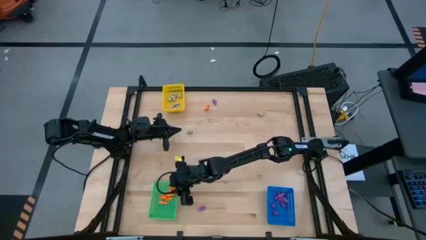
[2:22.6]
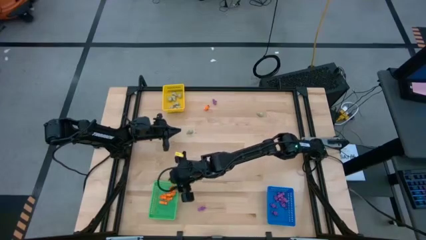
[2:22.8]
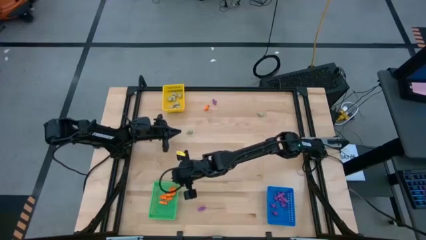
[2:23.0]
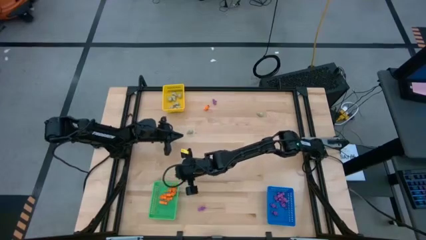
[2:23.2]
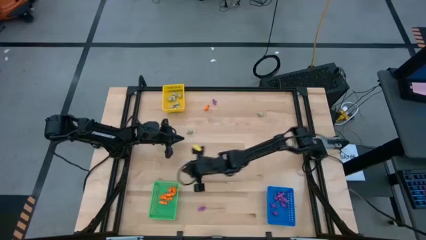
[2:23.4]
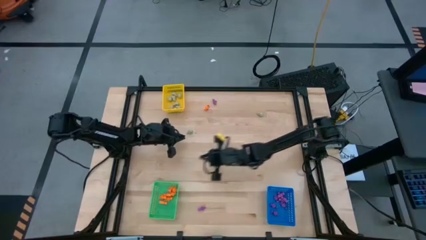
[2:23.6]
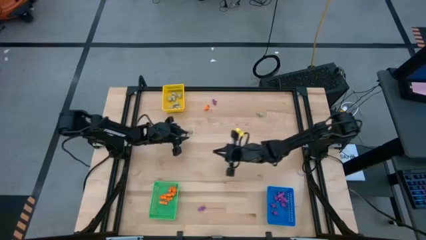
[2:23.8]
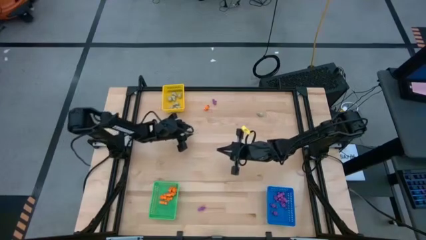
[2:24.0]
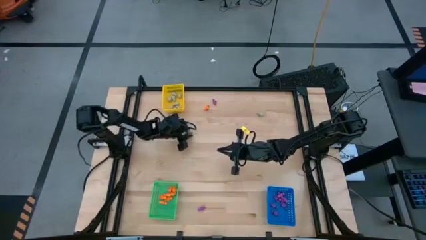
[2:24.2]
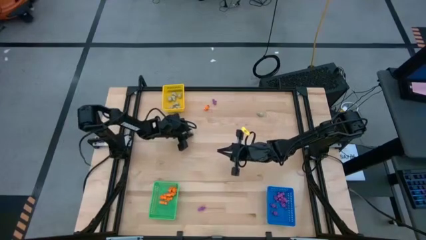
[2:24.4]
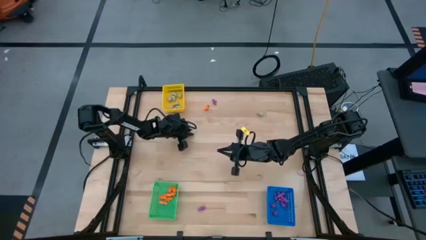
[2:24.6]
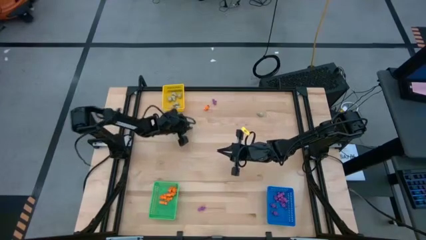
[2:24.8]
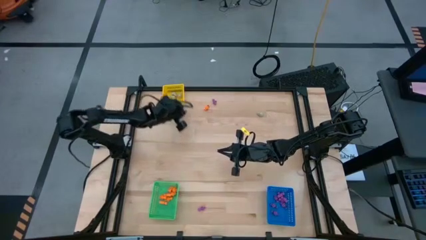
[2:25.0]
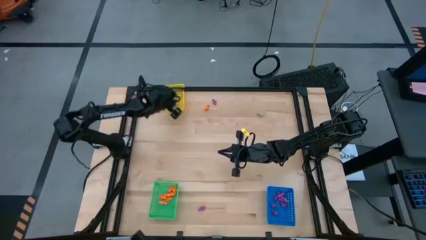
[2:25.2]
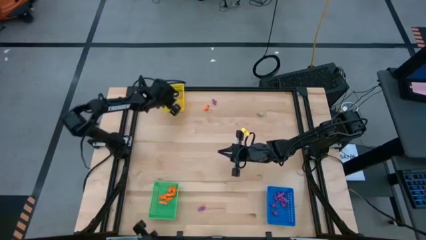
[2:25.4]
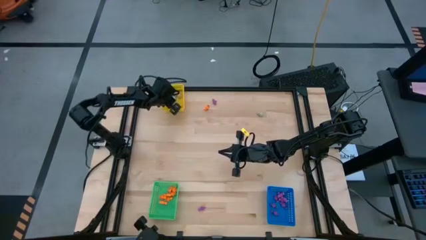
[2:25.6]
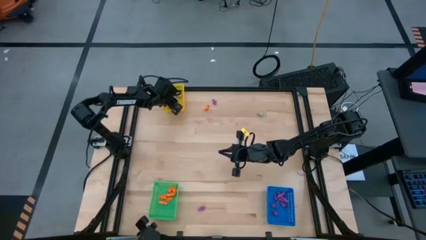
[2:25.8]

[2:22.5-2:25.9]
Task: Sort Halloween decoration
Put the gray skull toy into the yellow bin

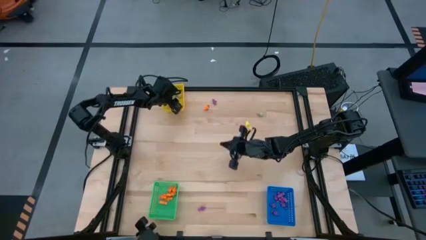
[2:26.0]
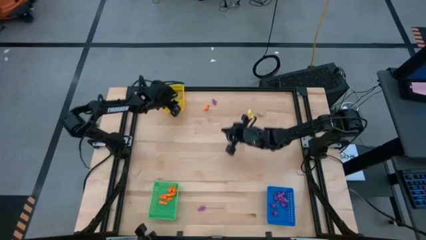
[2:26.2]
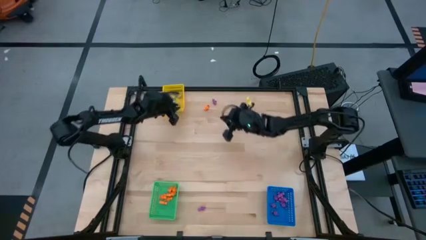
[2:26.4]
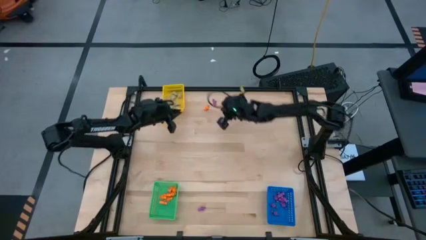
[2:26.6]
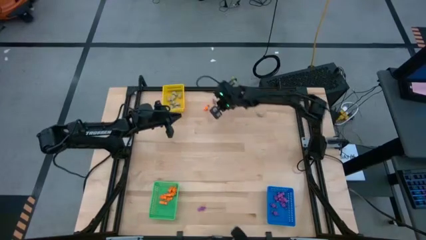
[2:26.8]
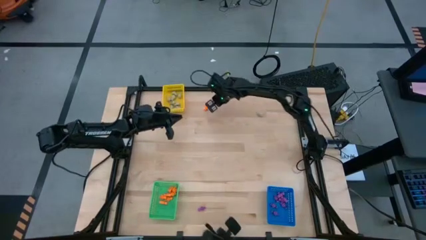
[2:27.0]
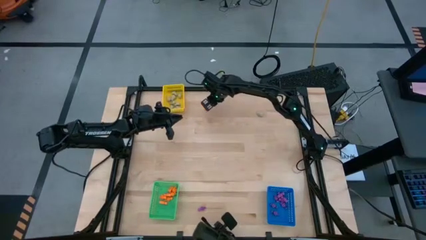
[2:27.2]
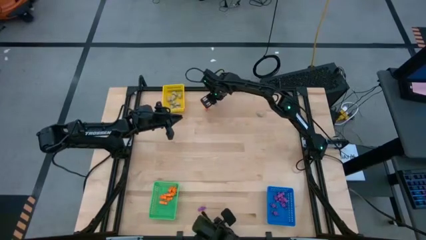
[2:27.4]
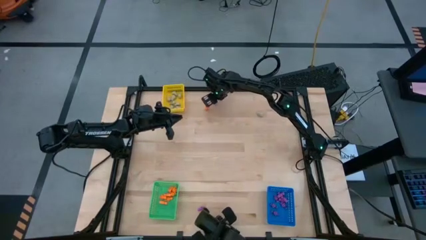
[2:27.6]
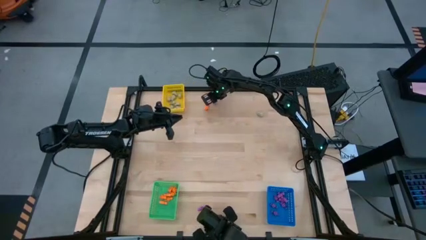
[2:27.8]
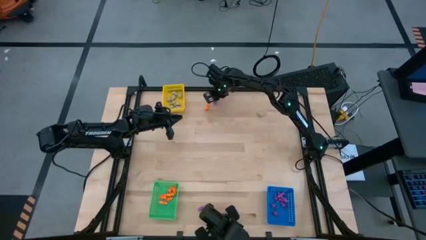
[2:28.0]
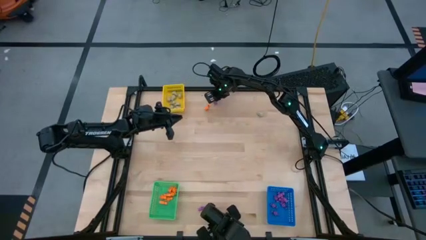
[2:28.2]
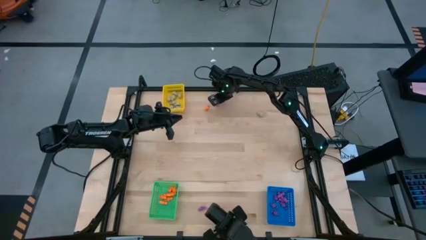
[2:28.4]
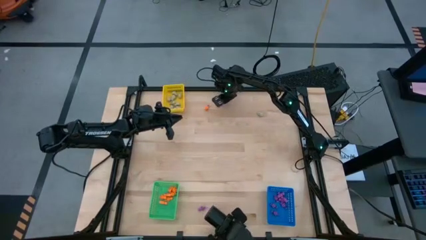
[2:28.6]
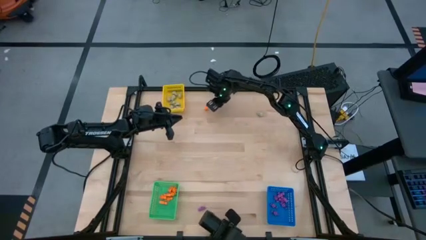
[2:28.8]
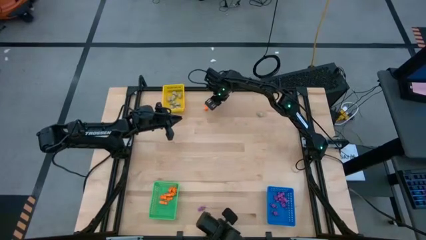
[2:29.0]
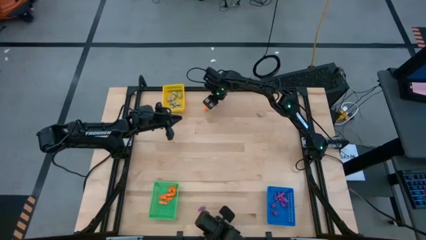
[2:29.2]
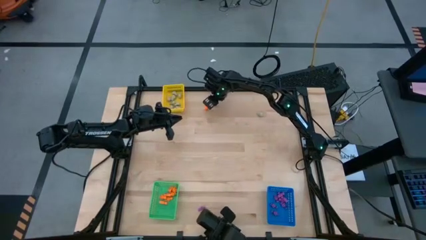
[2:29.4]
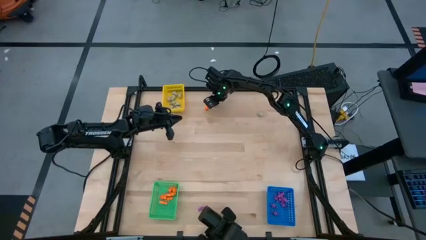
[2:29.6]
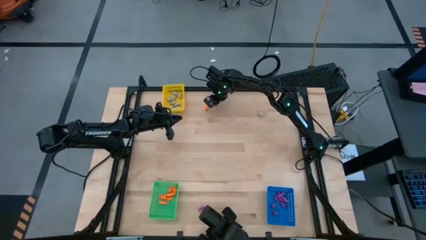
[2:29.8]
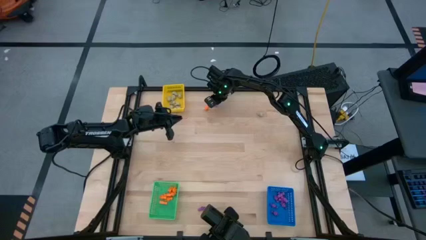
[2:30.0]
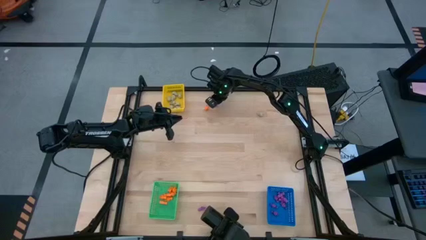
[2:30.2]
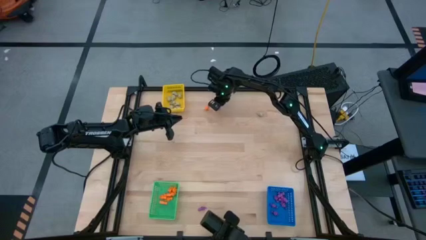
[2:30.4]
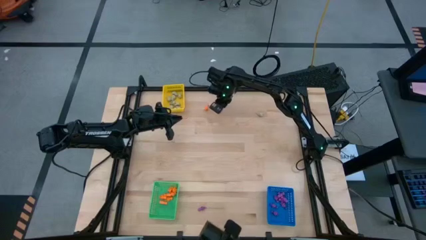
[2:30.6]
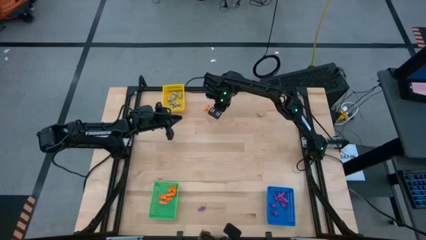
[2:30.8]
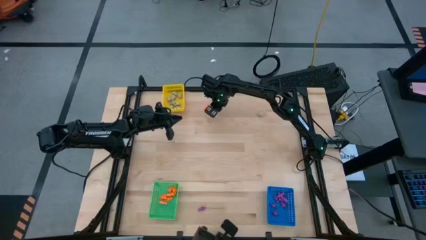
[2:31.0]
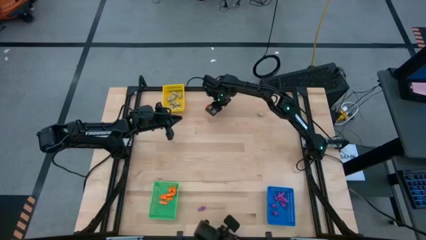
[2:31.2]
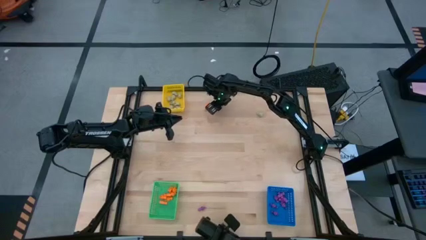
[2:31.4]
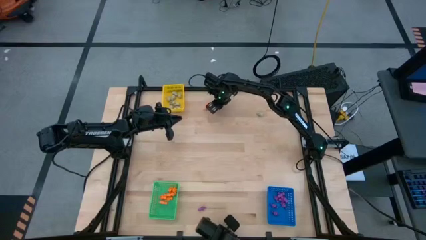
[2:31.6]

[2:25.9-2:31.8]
Put the purple skeleton toy into the blue bin

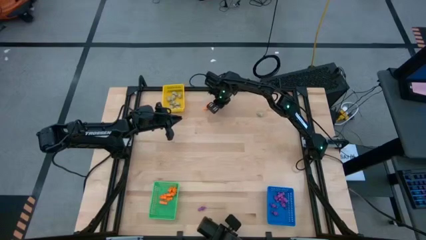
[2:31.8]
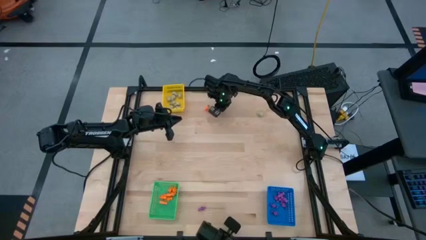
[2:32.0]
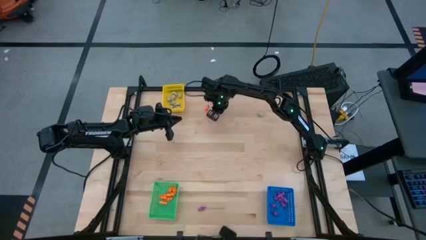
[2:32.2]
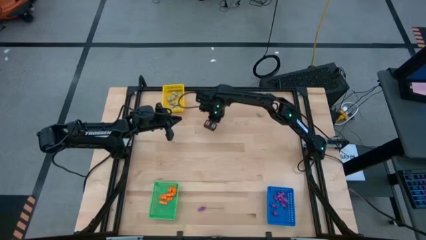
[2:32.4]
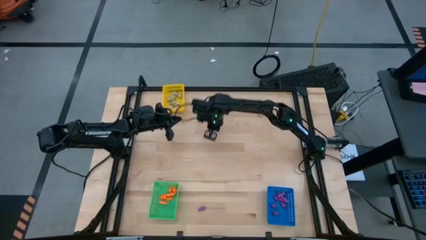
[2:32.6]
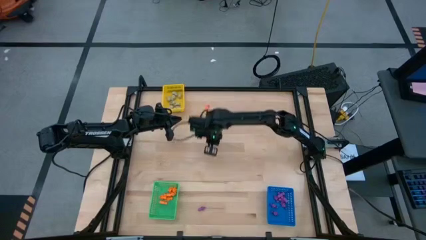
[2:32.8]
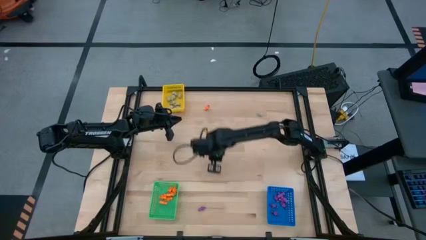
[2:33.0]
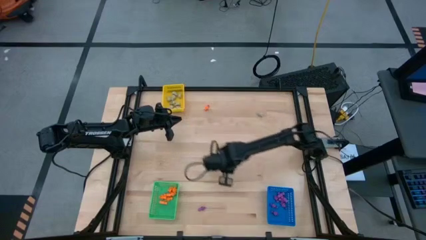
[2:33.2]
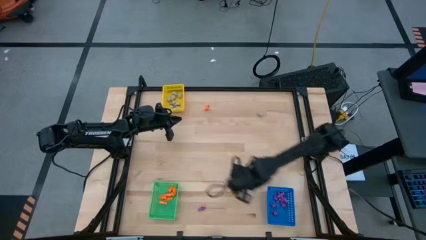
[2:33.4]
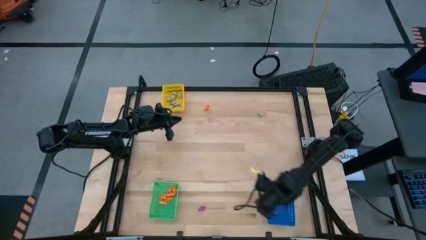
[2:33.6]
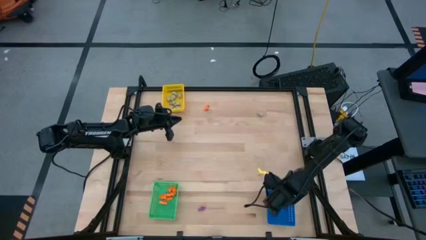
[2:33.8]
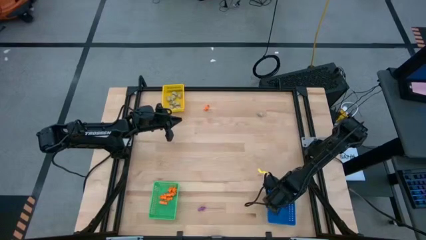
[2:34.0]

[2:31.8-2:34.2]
Put the purple skeleton toy into the blue bin

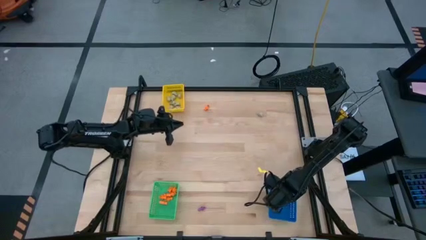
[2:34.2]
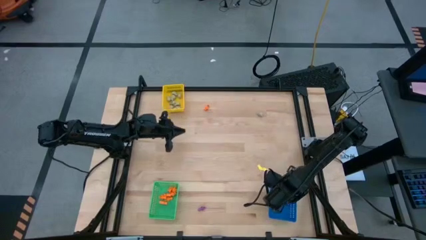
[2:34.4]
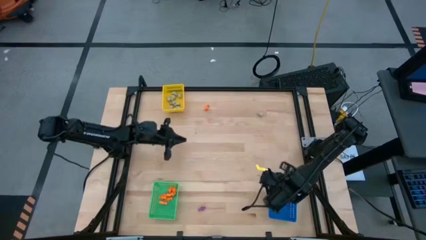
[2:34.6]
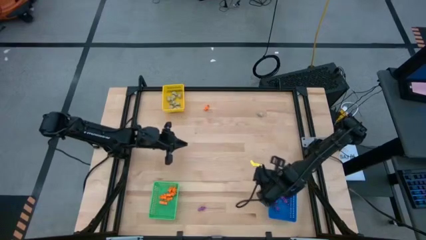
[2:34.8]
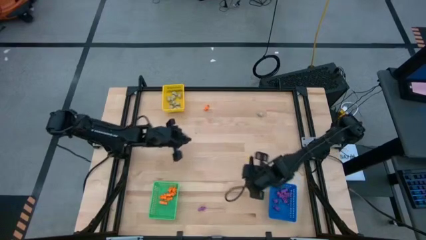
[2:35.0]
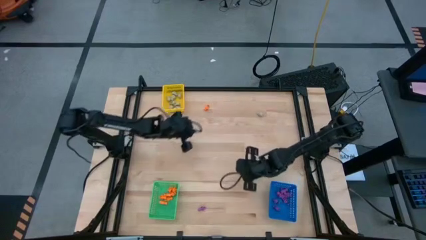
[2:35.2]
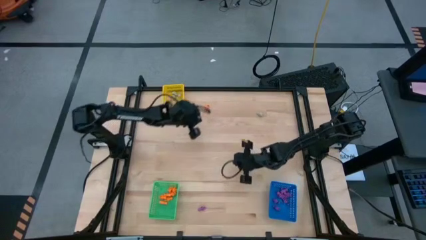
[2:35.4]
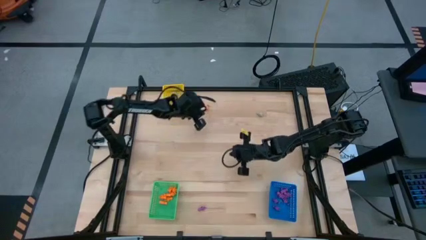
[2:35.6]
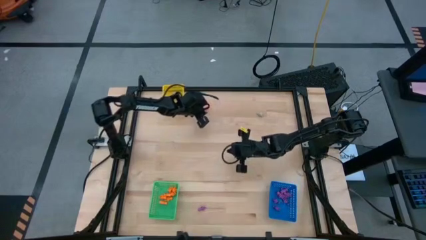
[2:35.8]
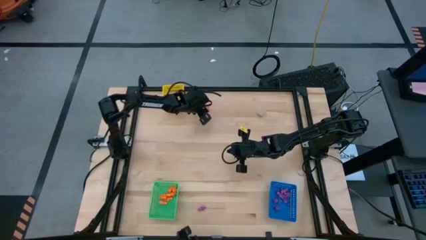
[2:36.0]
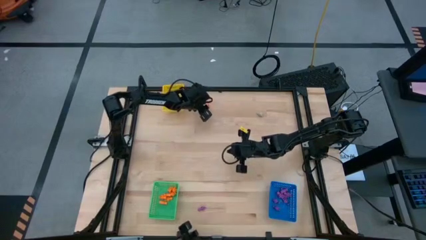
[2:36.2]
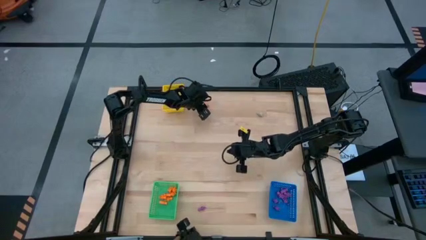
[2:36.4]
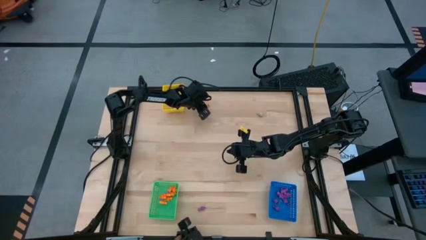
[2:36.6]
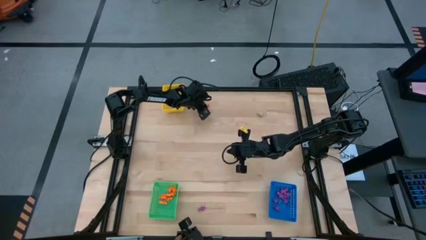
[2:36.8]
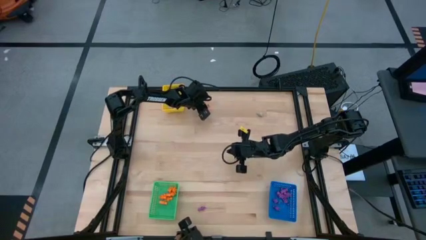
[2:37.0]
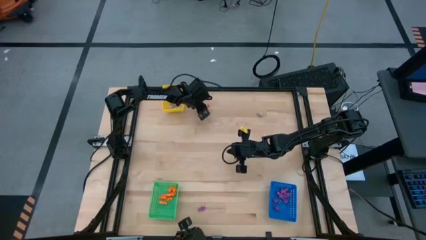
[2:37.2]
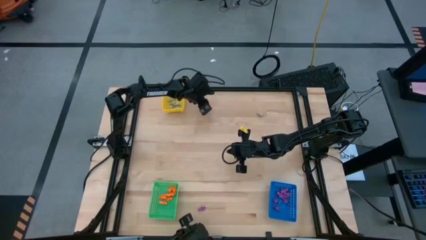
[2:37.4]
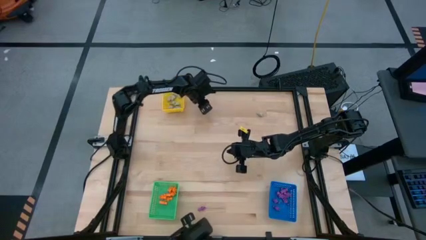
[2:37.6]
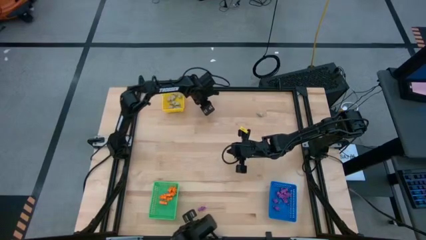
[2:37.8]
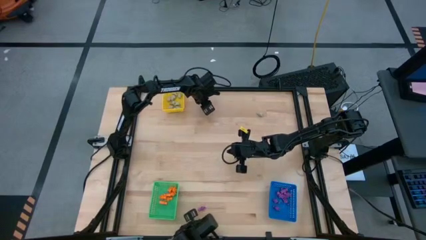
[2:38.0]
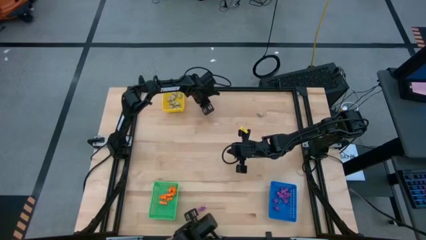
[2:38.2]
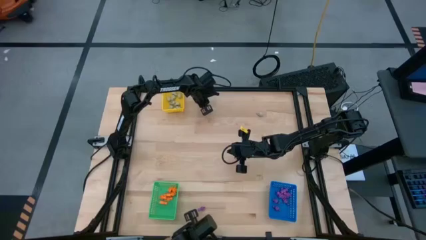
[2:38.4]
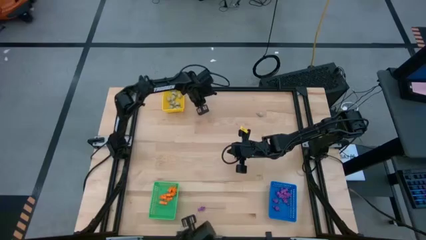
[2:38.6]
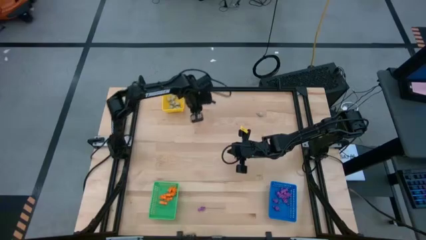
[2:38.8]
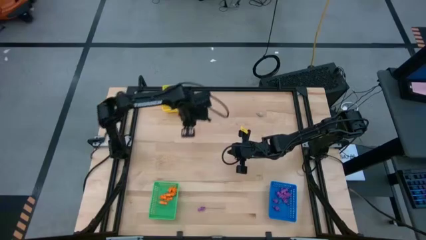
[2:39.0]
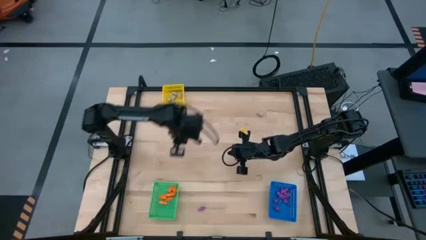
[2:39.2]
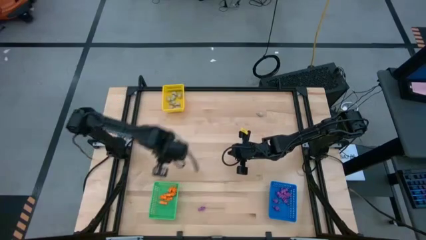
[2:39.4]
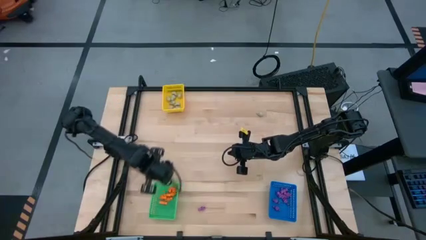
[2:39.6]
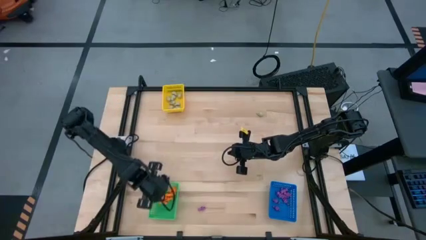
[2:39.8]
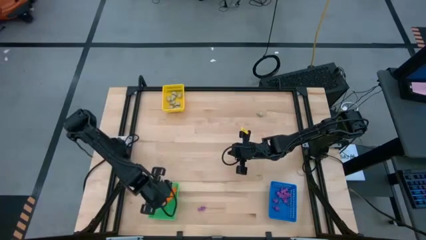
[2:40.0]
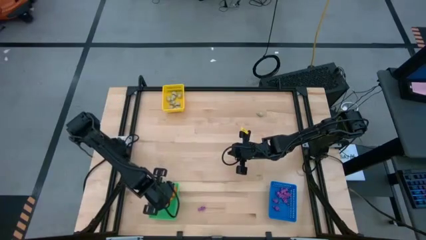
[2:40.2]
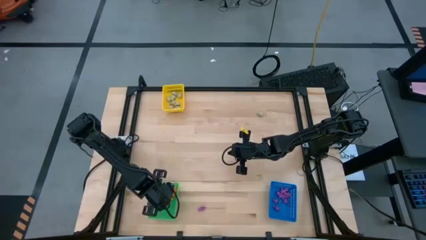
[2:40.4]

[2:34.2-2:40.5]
Put the orange skeleton toy into the green bin
